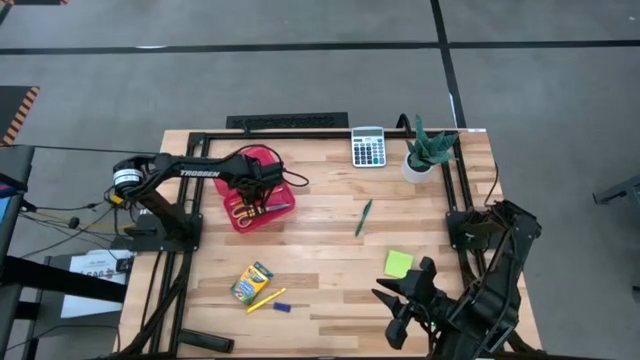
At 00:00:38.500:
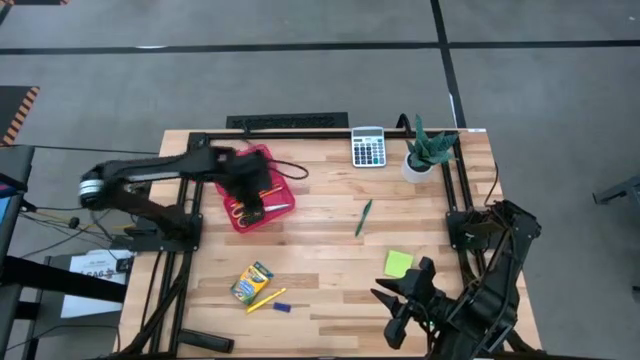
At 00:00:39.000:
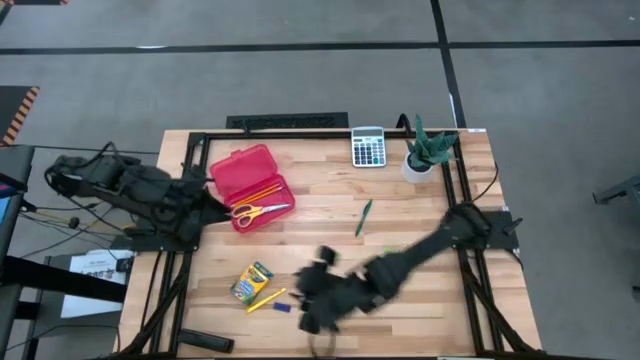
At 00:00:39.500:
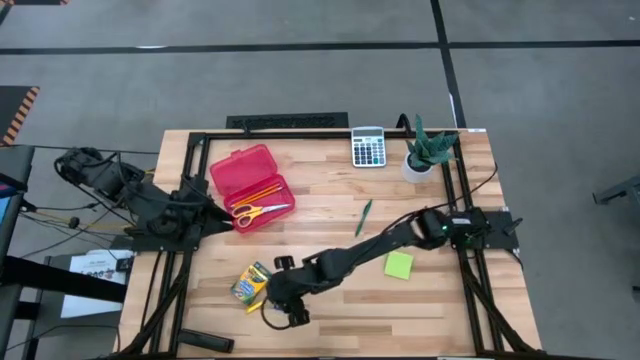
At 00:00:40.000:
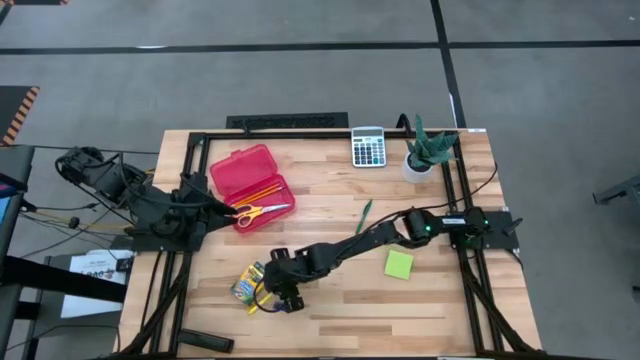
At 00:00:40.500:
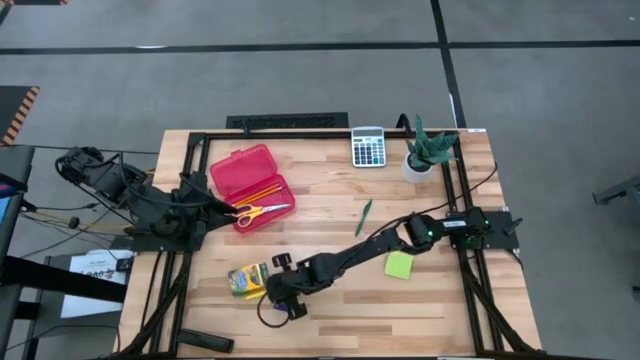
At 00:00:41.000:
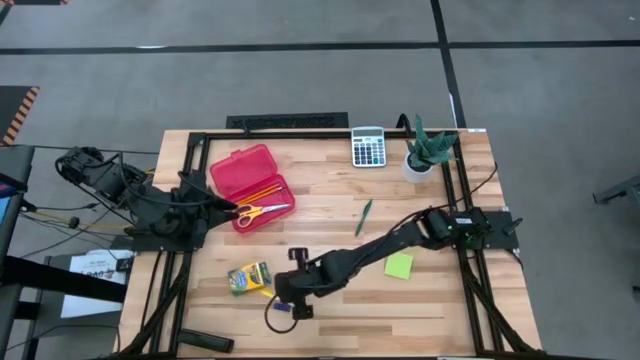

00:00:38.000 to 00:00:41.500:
Task: Pack school essentials
Put the yellow pen into the red supply box

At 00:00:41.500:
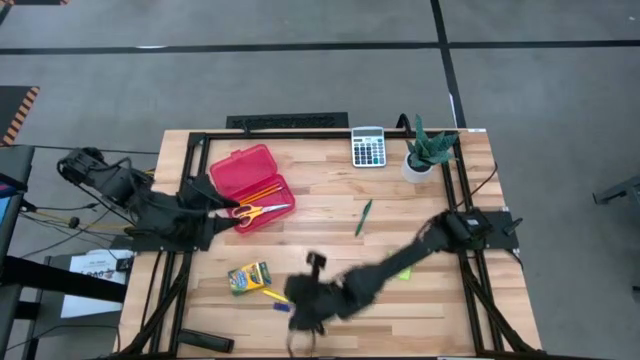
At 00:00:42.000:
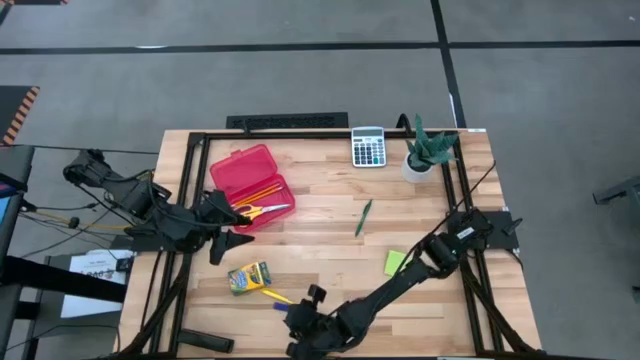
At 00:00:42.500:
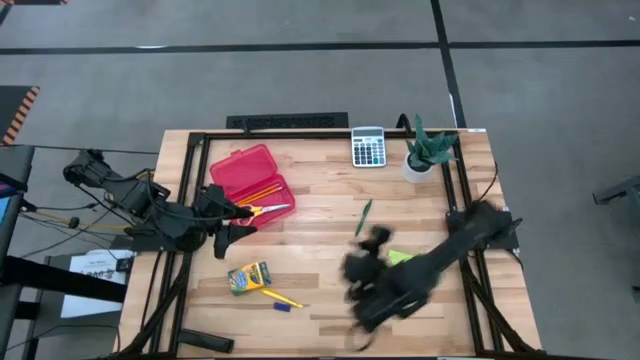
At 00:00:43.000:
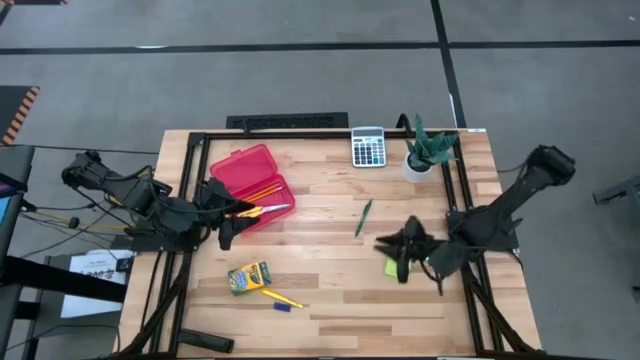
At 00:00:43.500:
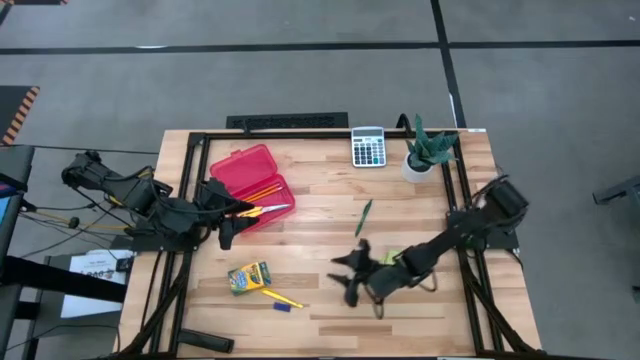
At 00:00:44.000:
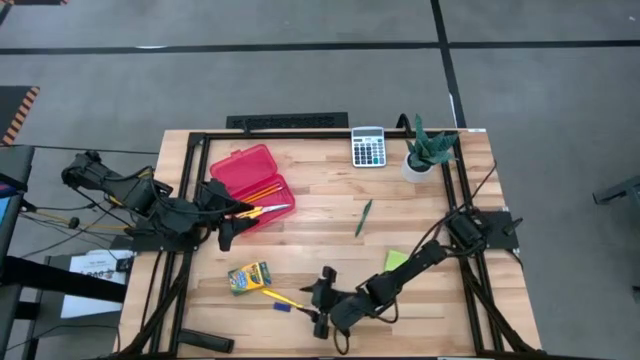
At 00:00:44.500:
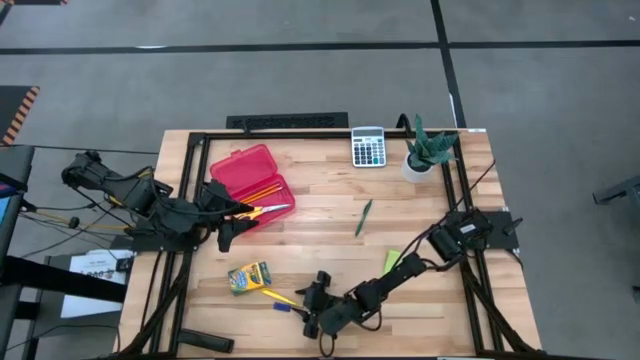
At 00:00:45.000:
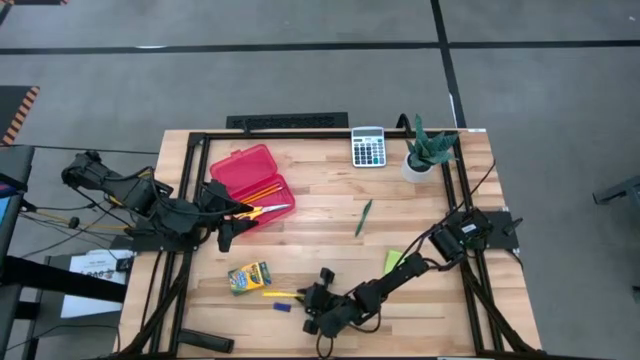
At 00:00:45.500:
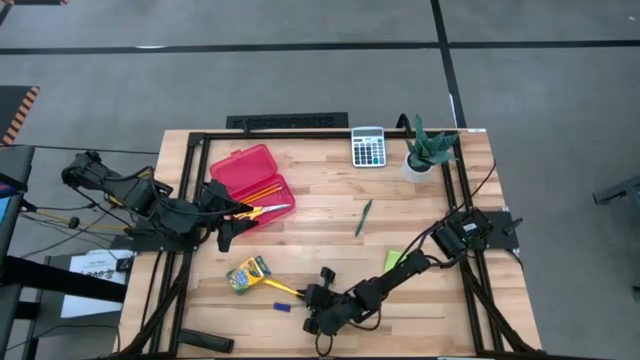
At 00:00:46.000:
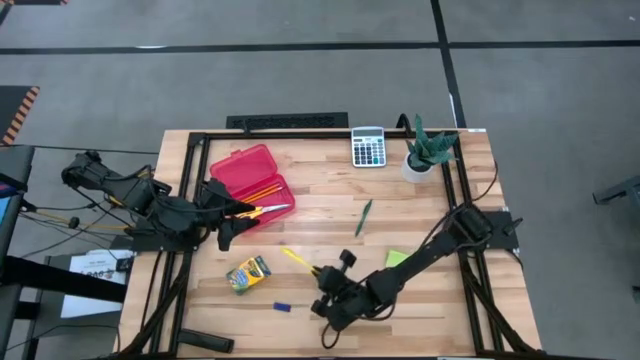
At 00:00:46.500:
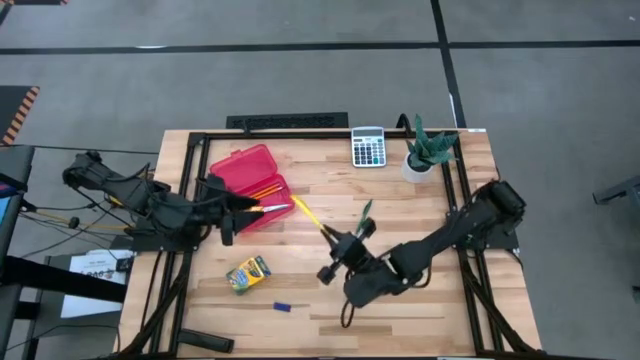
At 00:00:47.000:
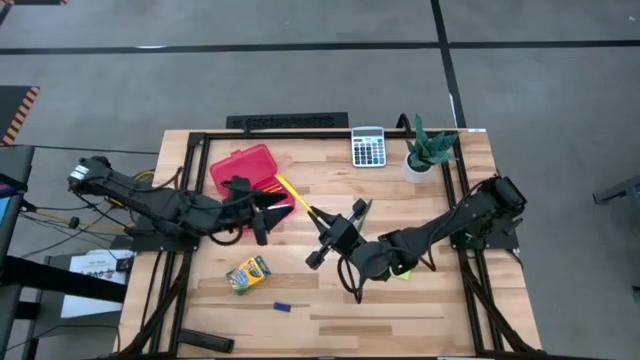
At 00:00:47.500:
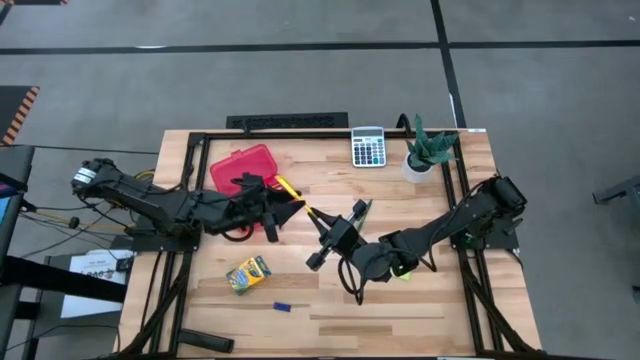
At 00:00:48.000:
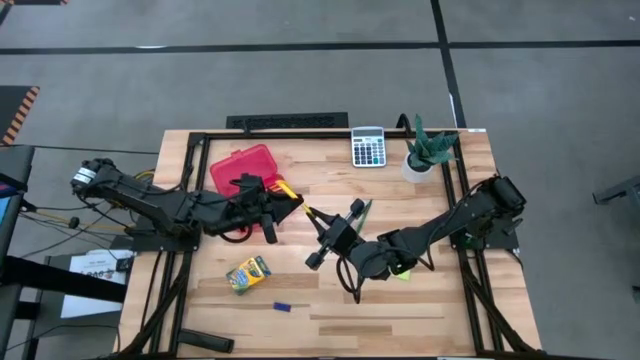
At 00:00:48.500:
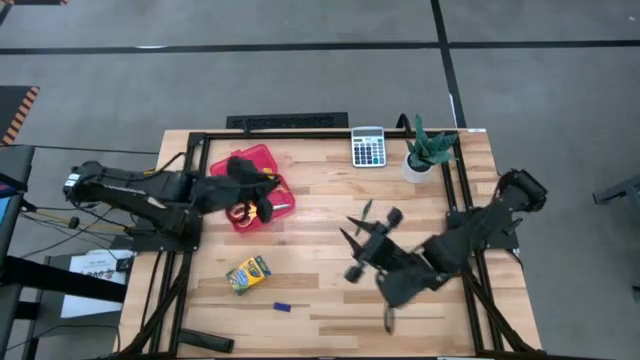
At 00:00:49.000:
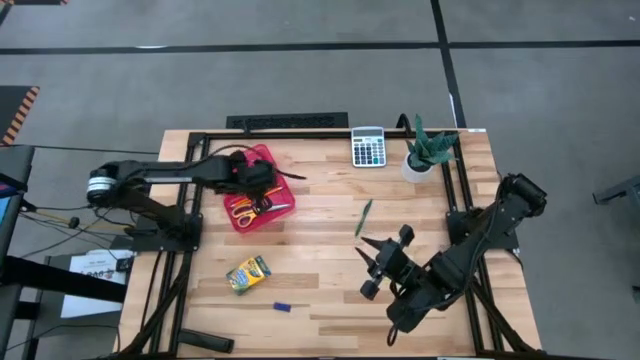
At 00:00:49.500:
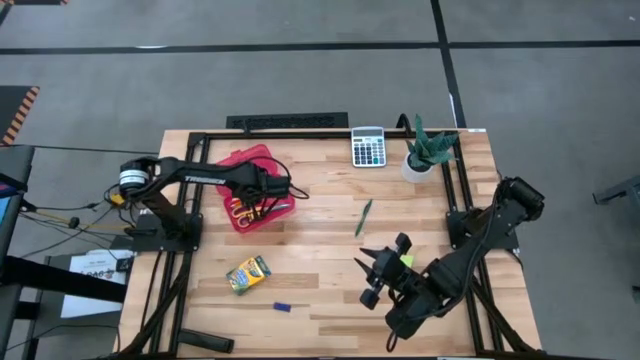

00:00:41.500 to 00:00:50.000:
Put the yellow pen into the red supply box

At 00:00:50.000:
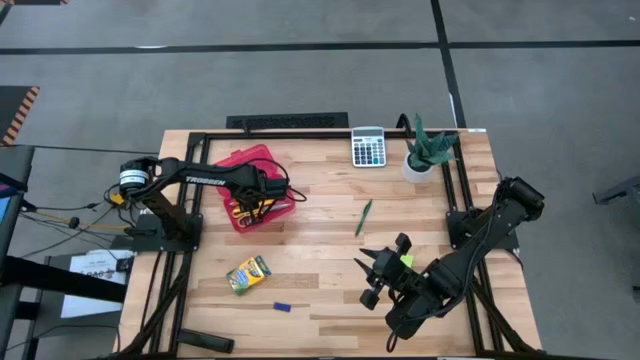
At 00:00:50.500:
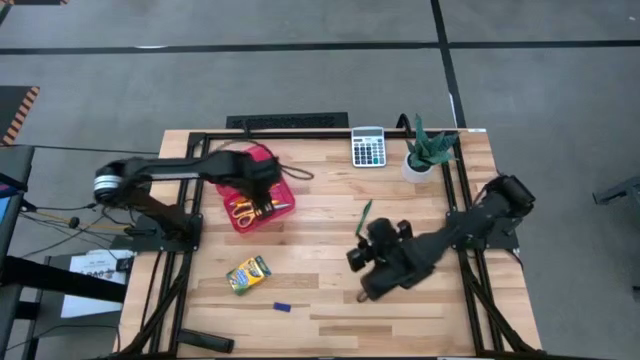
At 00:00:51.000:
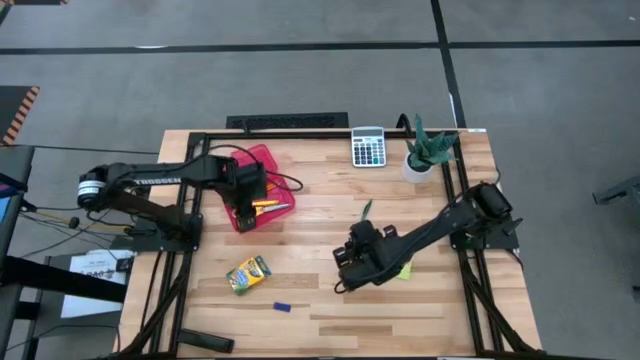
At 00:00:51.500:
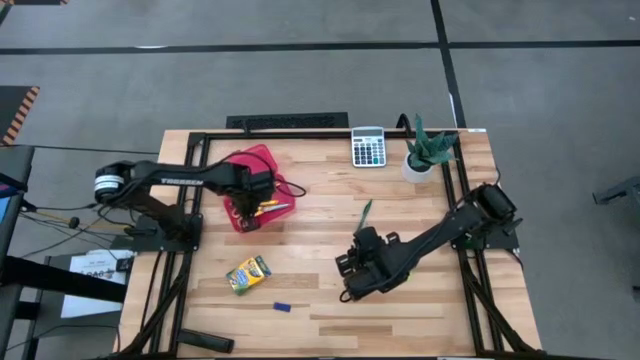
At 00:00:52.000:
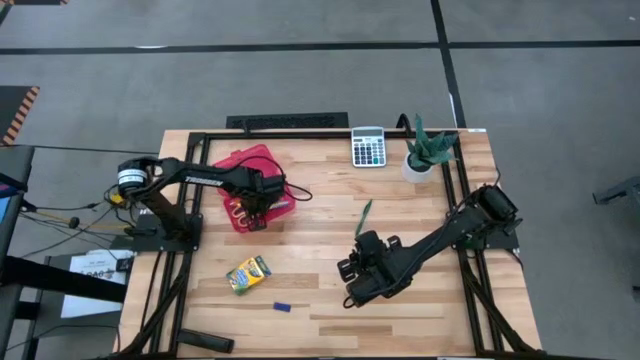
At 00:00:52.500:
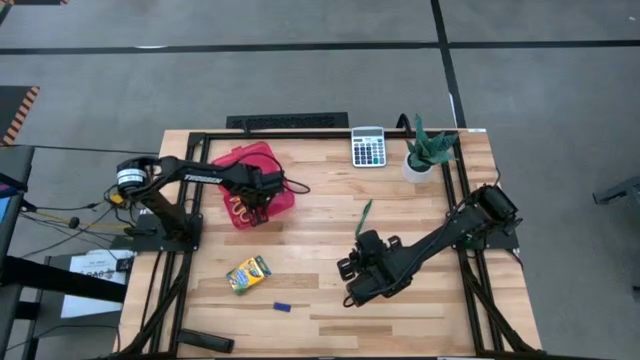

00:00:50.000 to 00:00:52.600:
Adjust the yellow scissors in the red supply box

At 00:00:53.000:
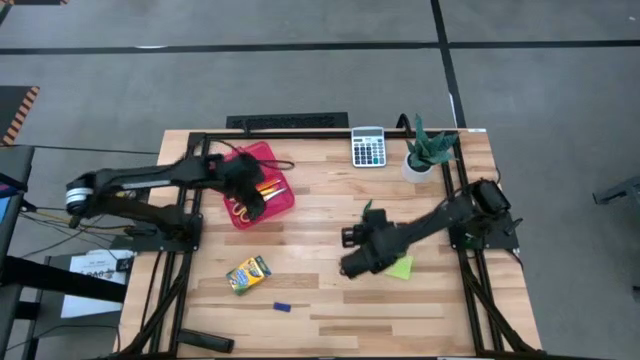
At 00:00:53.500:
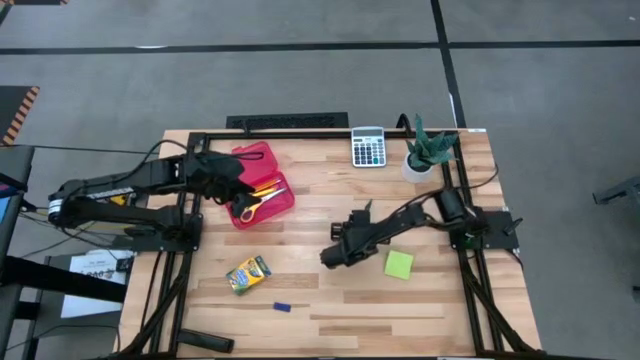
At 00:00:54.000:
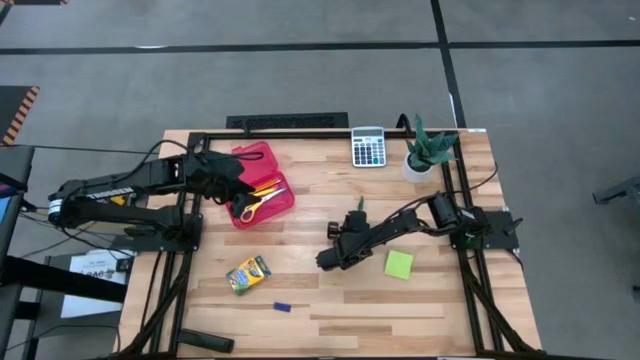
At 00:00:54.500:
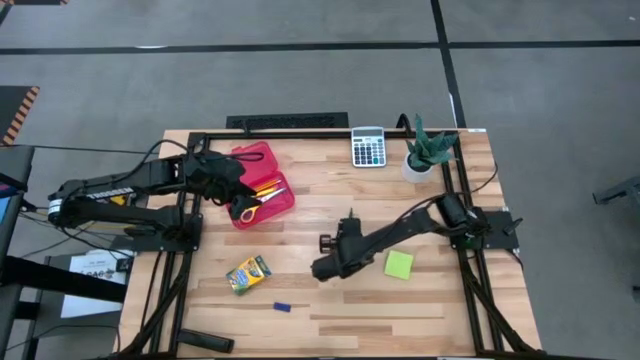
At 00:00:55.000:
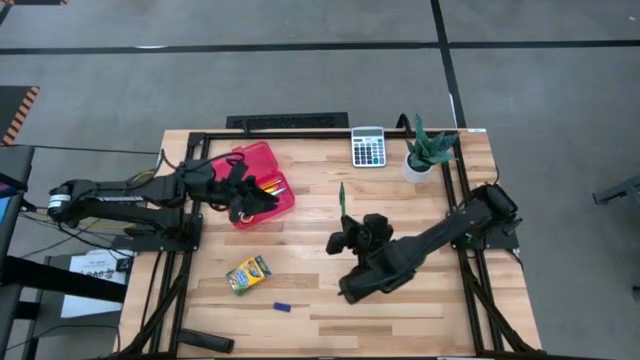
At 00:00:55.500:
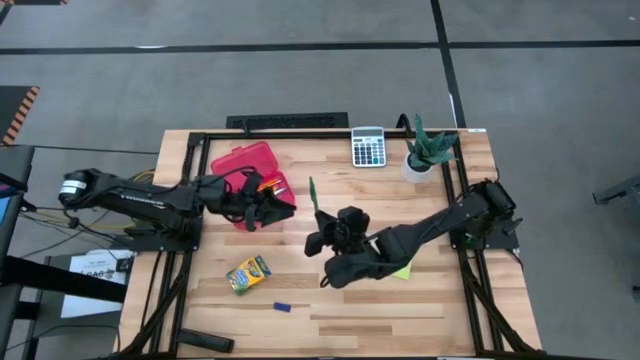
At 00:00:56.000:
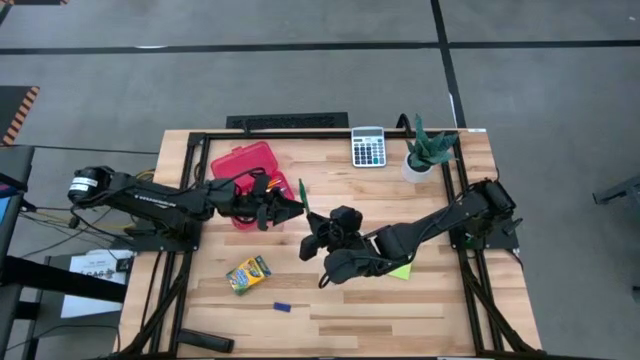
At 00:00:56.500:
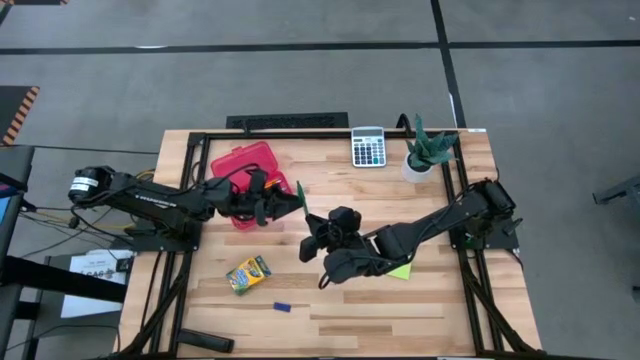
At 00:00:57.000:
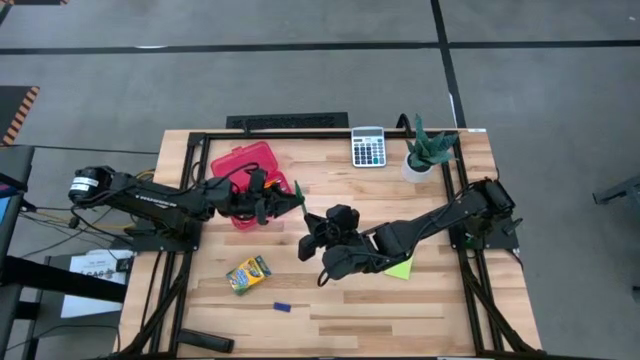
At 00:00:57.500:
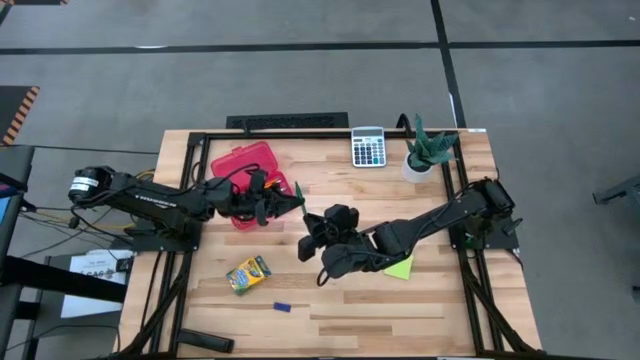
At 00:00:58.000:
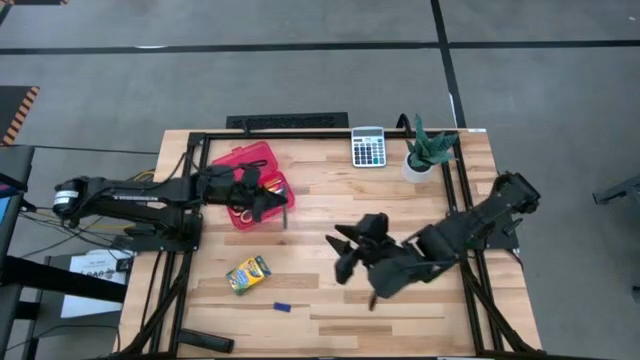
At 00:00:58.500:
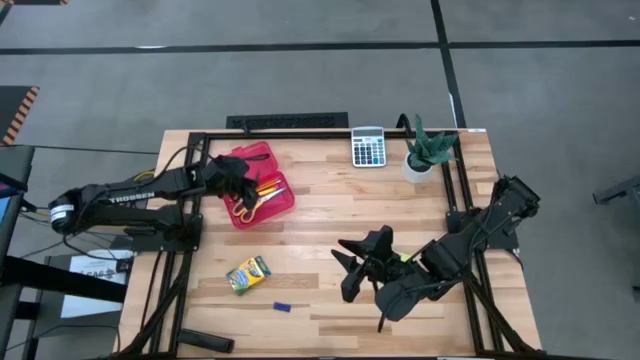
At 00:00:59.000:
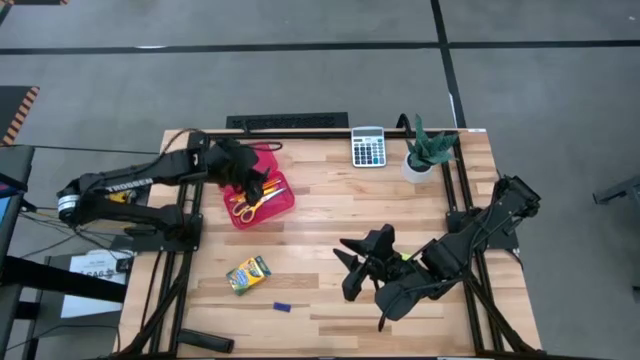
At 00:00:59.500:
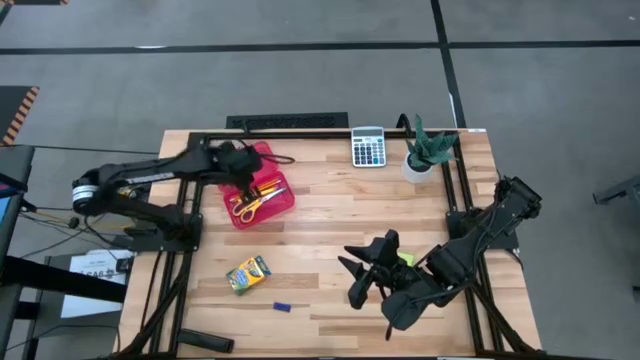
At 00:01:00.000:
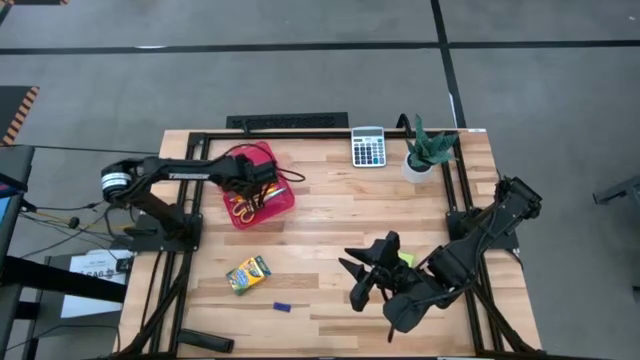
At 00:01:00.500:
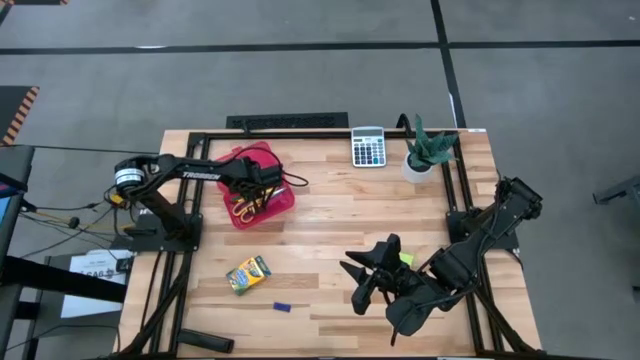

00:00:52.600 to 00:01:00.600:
Put the green pen into the red supply box
